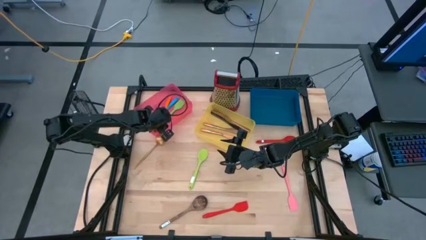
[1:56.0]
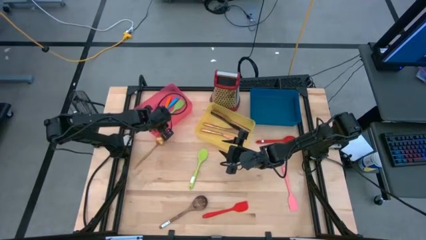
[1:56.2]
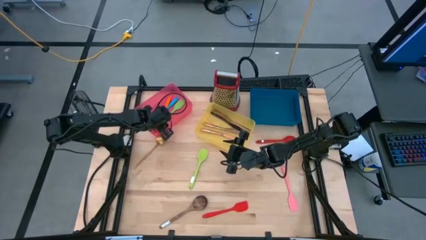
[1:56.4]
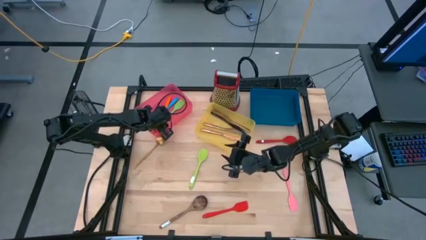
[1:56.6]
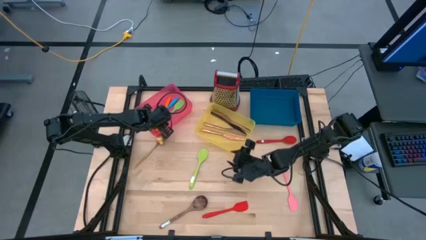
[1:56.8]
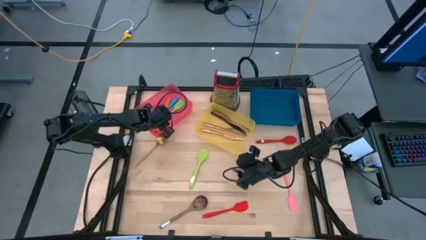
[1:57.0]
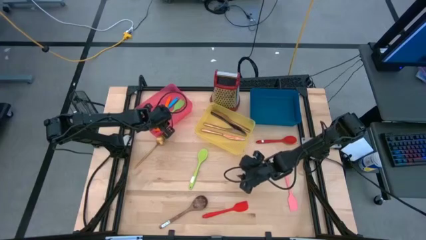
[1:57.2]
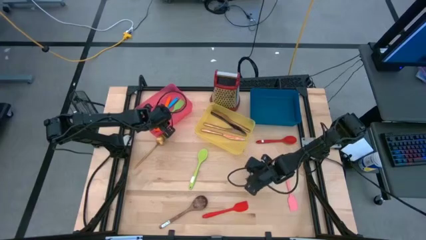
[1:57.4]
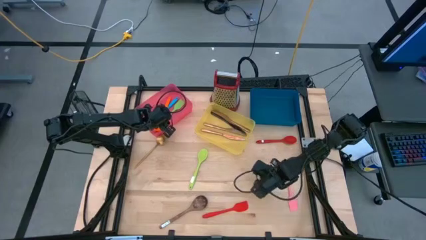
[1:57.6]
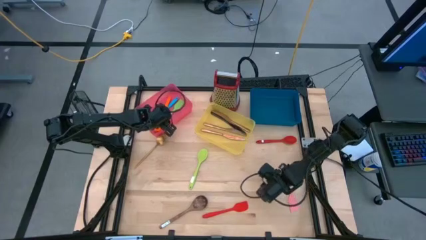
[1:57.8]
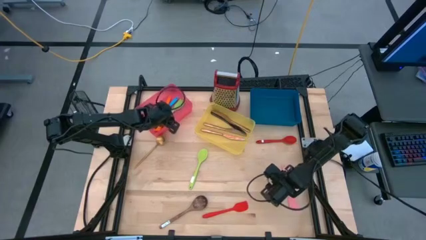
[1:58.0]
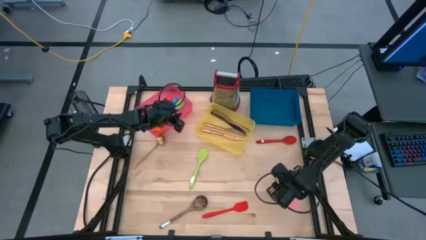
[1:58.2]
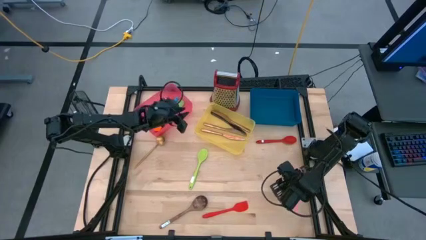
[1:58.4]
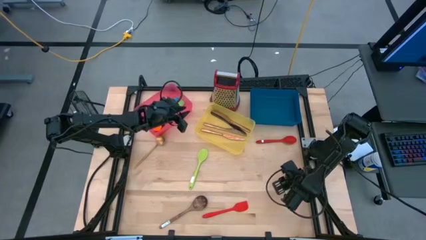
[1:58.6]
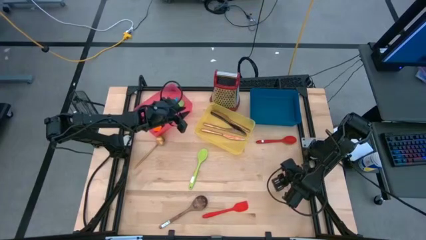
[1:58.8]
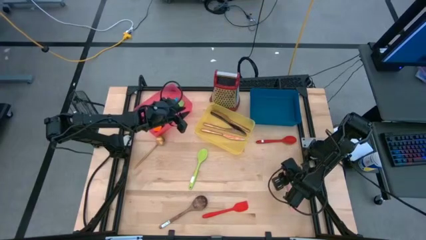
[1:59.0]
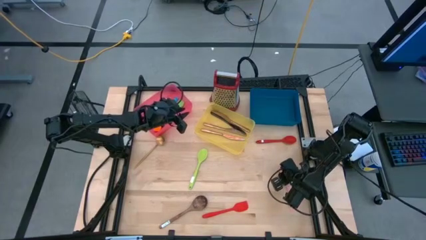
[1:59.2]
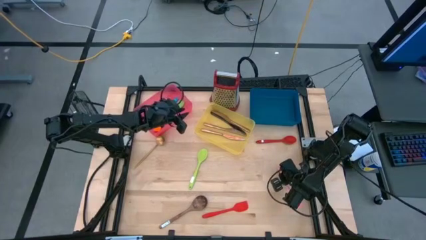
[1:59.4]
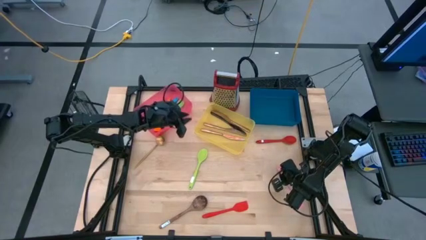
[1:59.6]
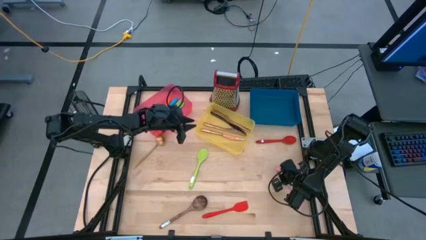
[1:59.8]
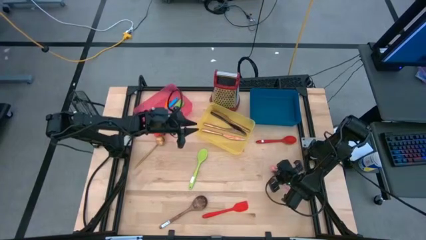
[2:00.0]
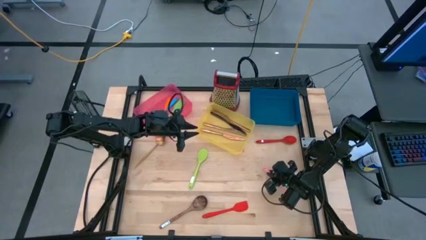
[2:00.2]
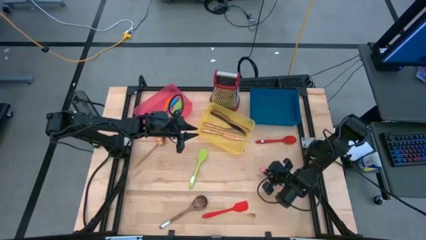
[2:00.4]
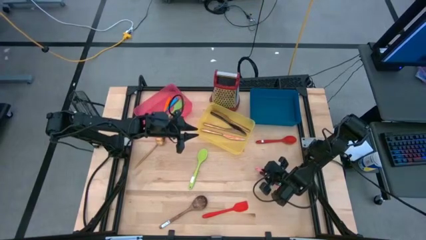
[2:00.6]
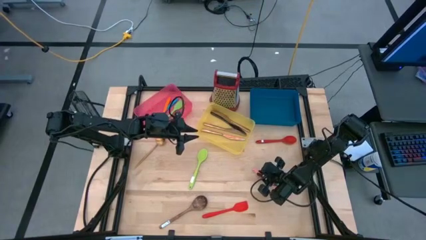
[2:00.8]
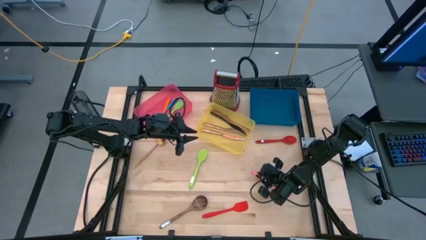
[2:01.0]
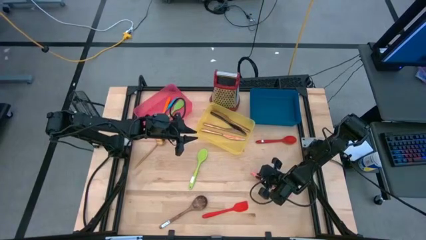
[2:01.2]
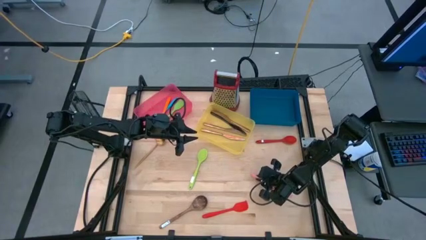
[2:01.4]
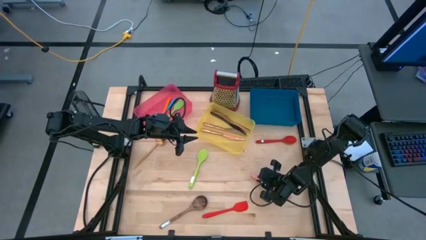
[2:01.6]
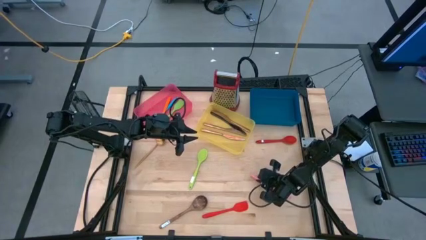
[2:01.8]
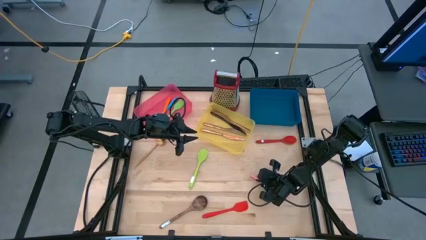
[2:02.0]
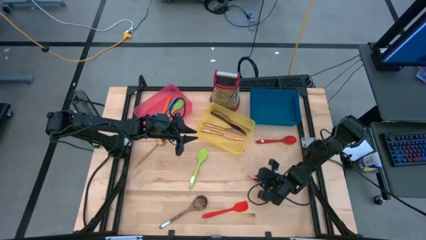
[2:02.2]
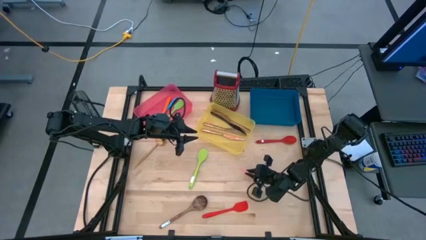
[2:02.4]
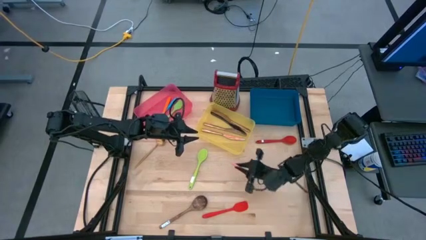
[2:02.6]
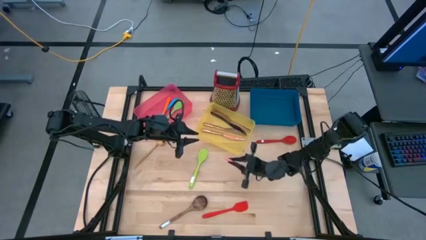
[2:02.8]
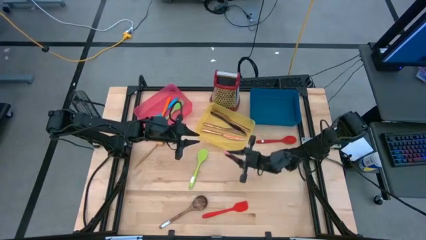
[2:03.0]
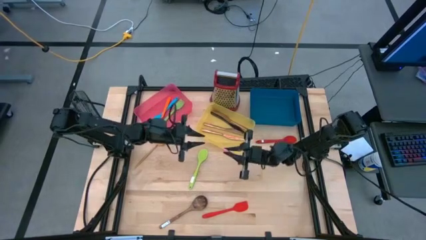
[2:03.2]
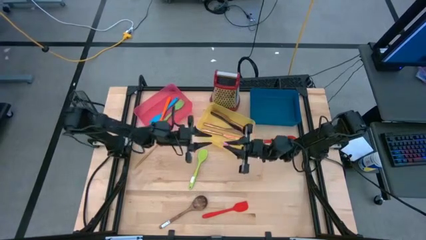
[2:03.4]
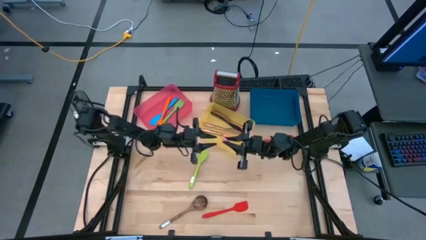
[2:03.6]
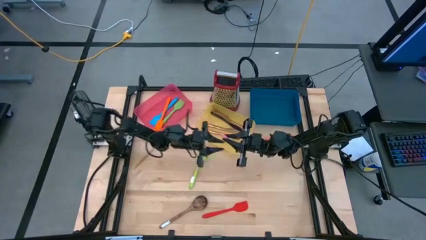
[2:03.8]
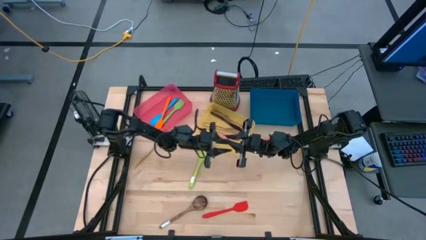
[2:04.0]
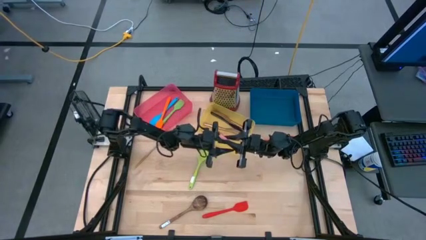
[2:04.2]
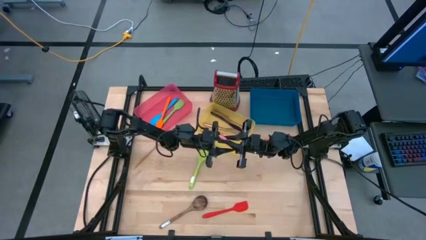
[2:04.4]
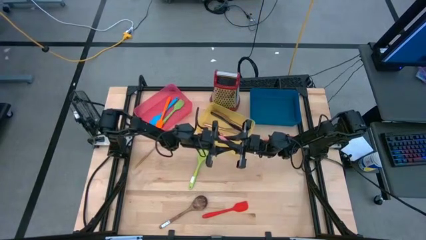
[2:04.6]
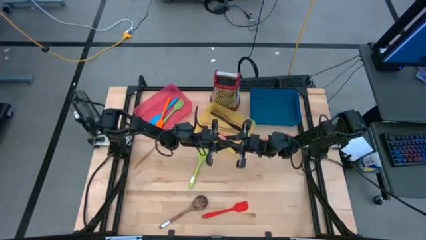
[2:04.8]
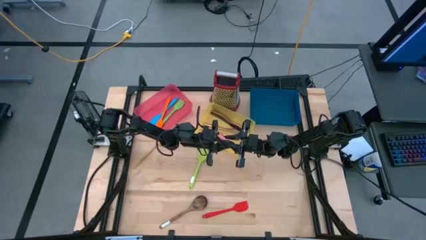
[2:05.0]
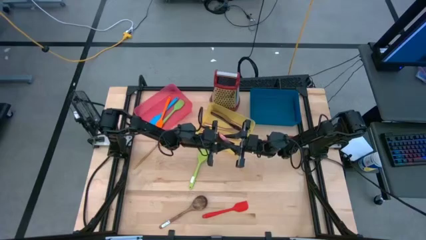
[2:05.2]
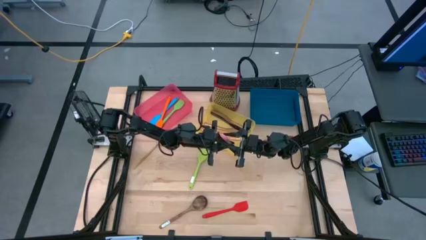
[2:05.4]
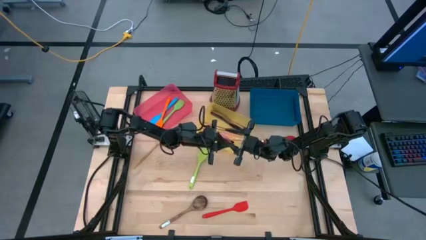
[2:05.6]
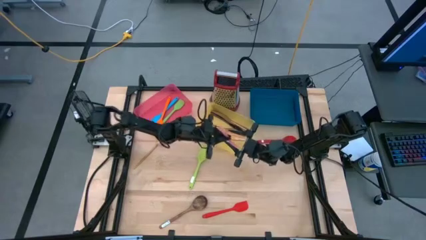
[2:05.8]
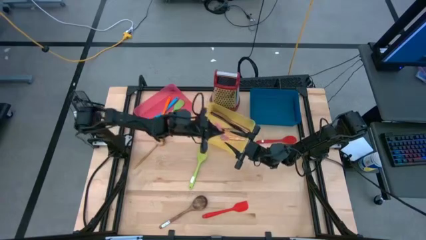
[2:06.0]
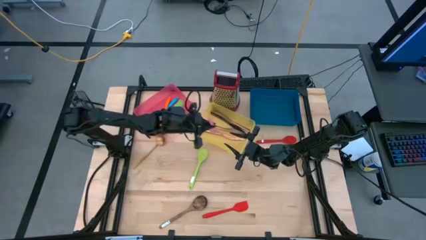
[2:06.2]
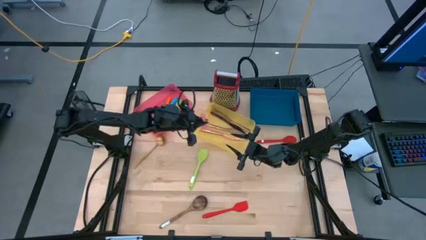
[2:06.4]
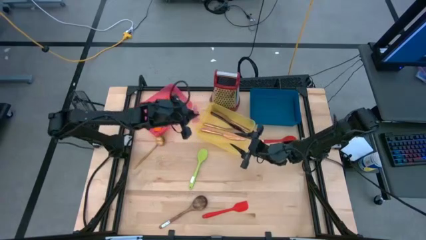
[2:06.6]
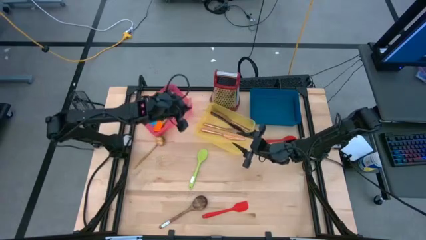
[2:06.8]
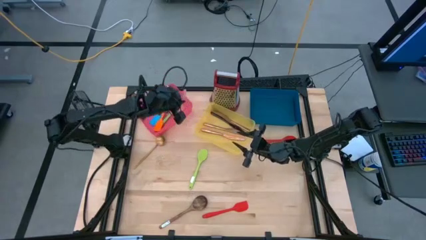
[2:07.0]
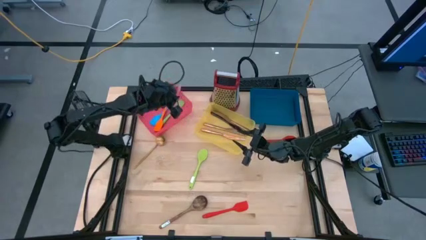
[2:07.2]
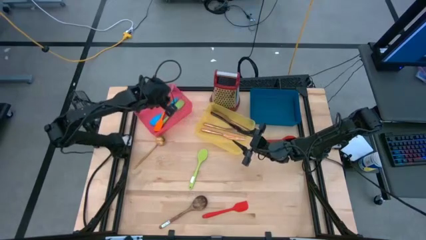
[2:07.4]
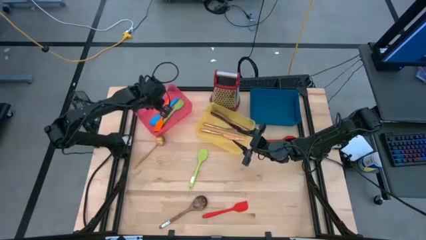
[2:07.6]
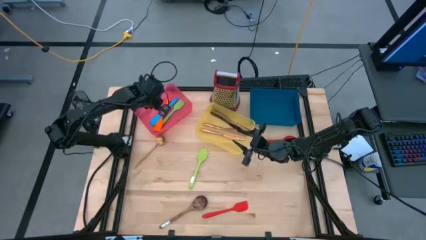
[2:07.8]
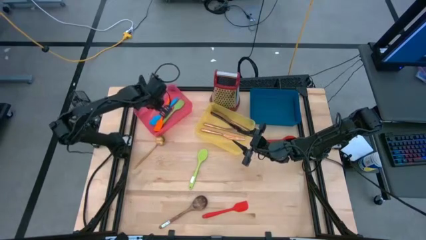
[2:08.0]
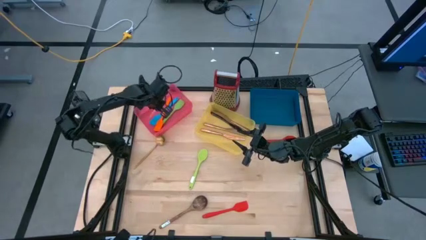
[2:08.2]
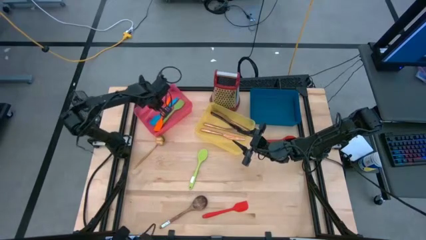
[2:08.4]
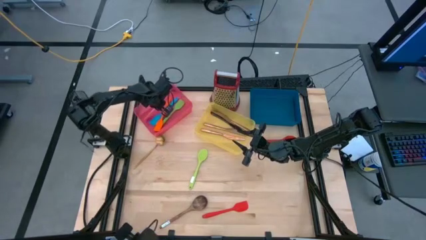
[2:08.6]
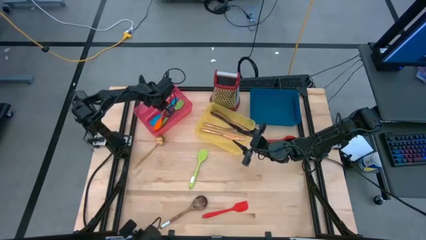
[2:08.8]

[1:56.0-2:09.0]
Task: Pick & Place Kitchen Items
Put the pink spatula into the red bin

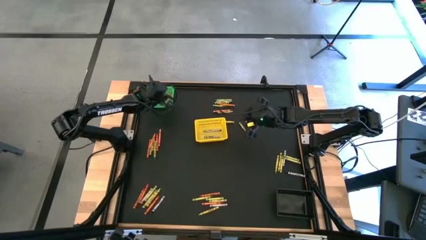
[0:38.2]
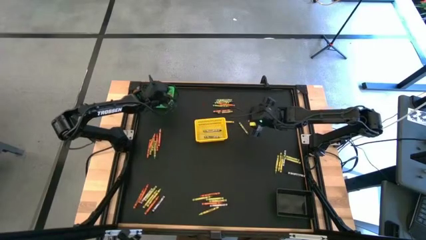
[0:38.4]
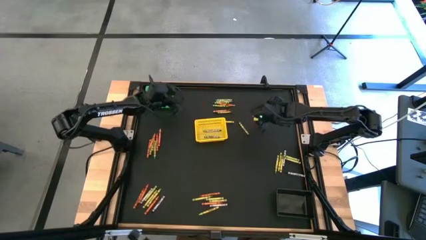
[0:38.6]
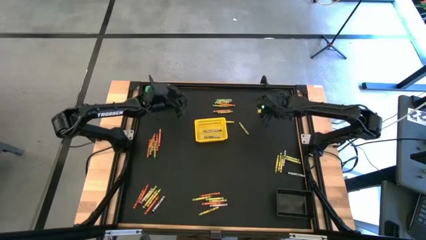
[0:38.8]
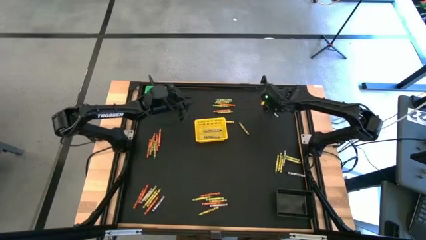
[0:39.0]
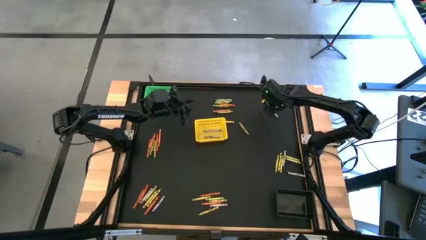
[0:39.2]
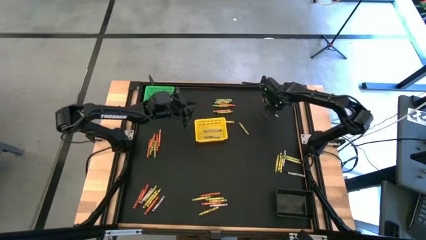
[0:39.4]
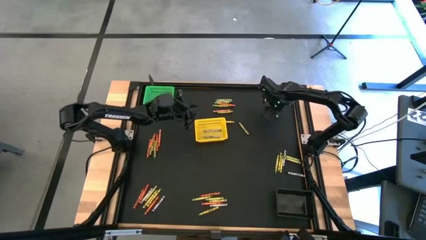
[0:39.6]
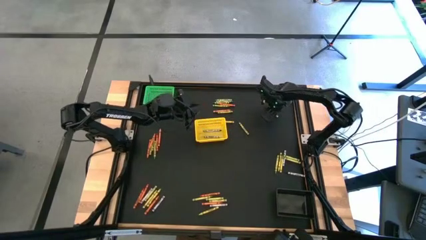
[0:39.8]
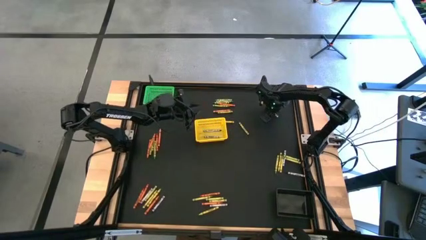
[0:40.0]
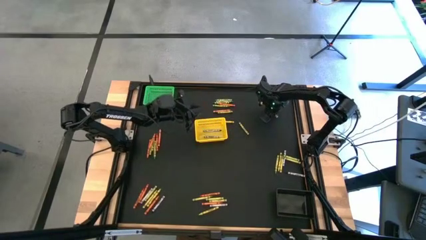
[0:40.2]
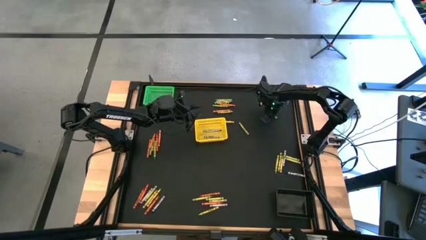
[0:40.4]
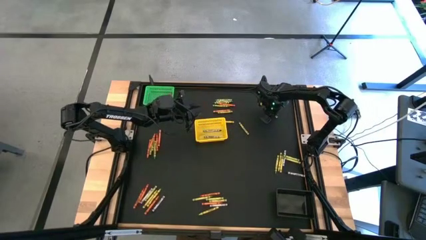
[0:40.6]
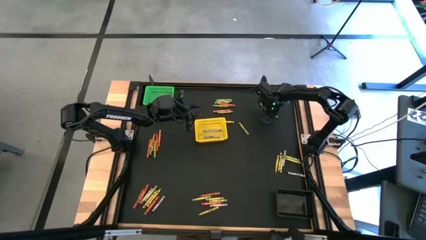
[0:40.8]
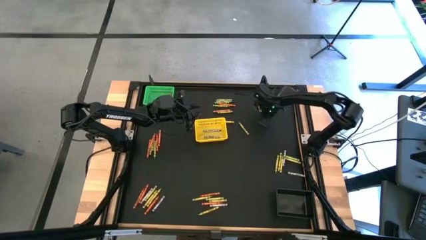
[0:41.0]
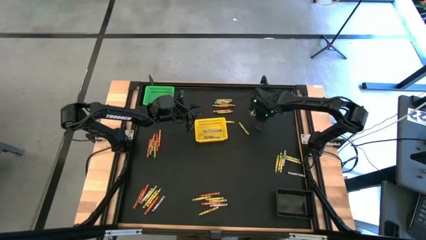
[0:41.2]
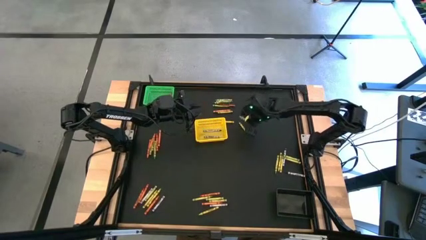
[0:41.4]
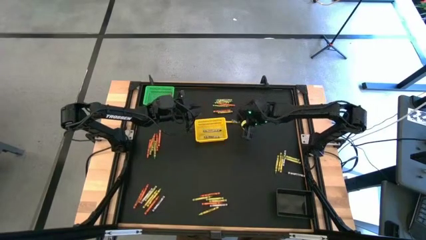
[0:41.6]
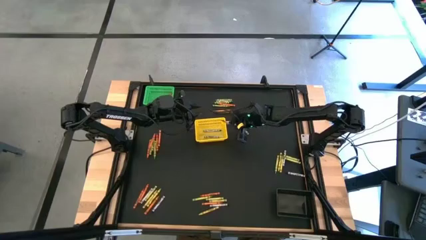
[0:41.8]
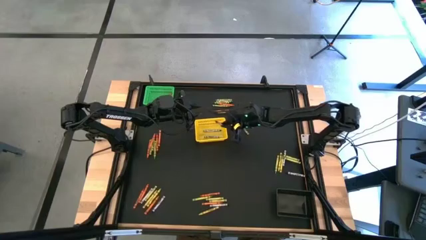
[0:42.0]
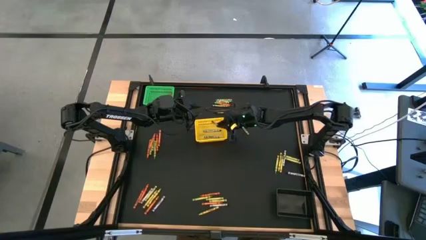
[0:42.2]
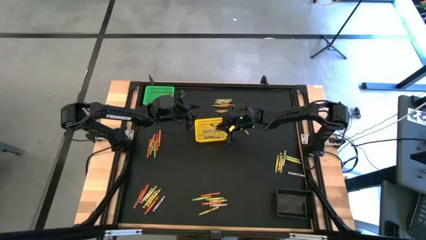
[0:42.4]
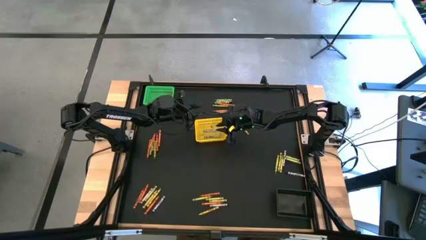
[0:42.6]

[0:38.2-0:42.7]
Task: Sort crayons
Put the black crayon into the yellow bin
